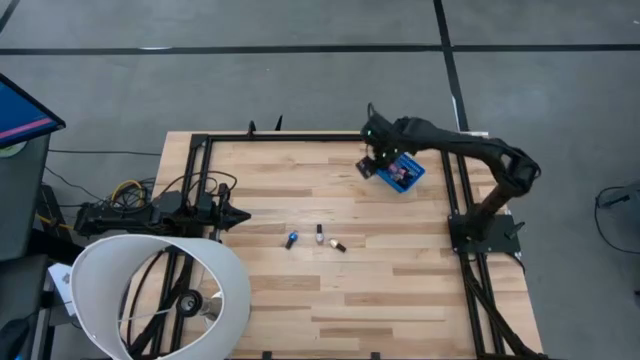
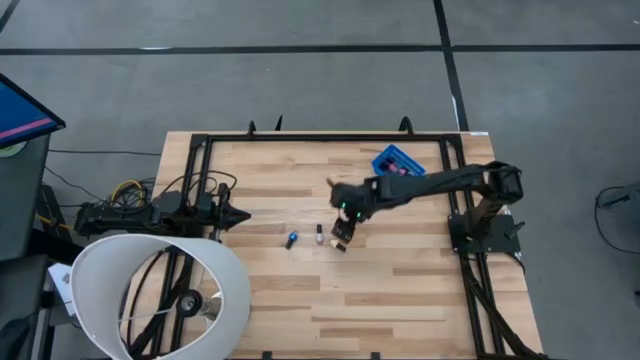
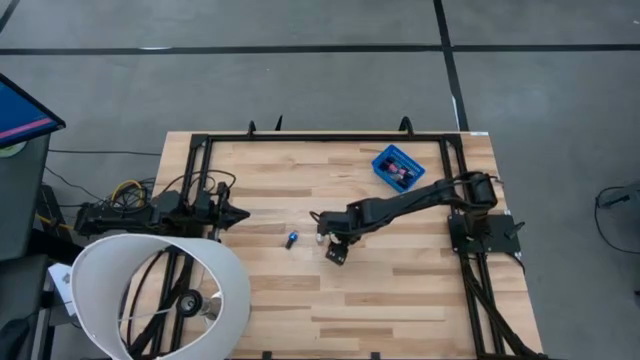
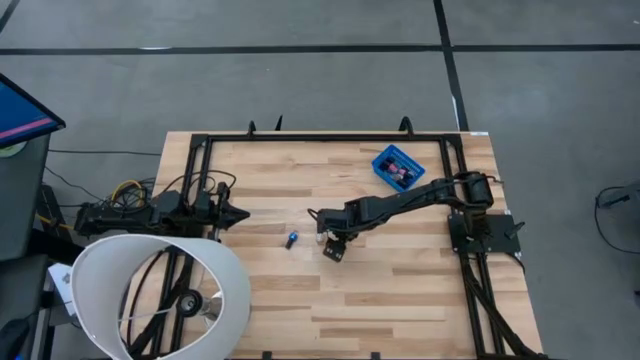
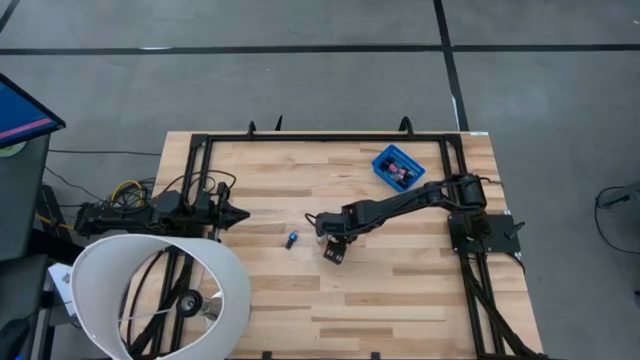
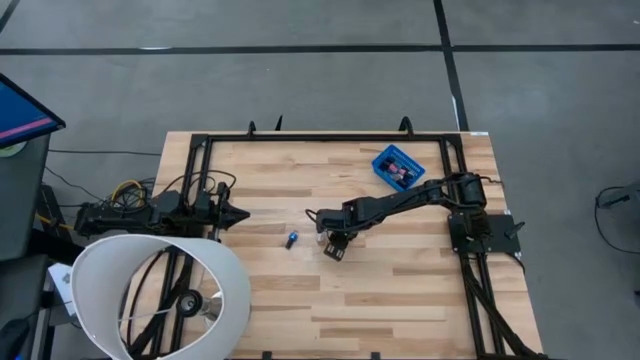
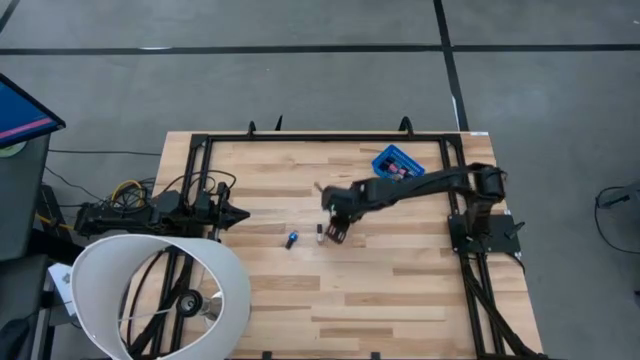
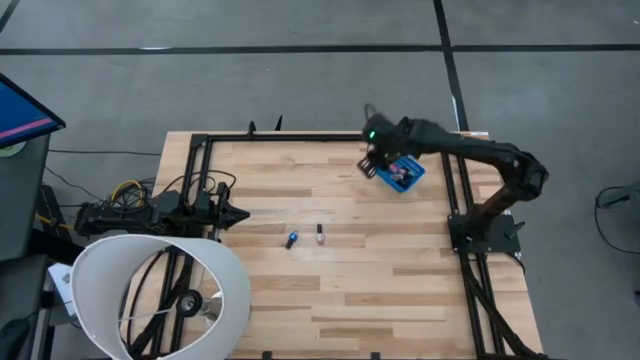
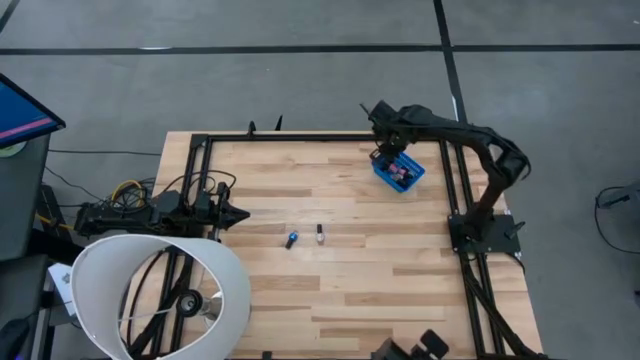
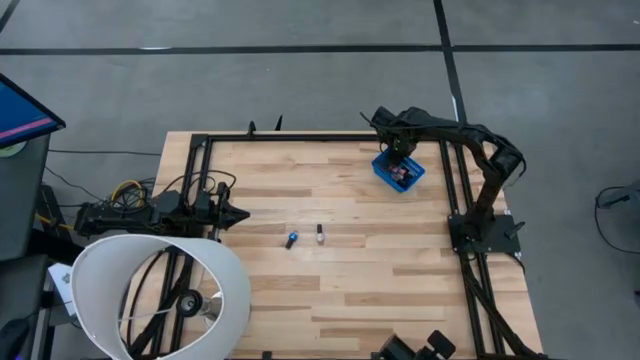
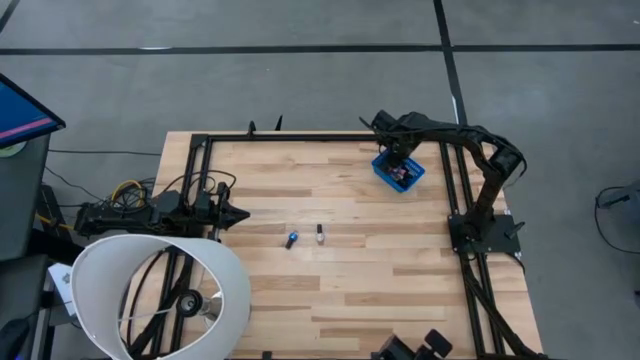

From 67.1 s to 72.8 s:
Task: Pick & Place Nail Polish
Put the yellow nail polish bottle into the blue bin

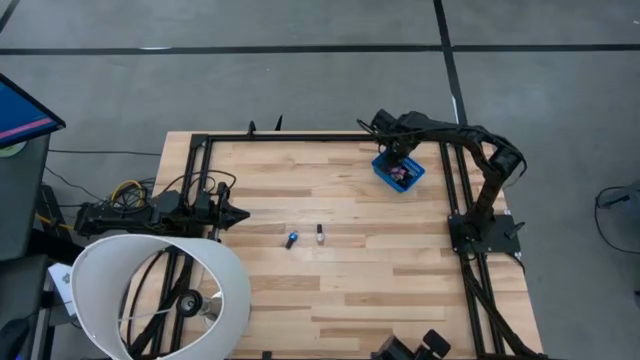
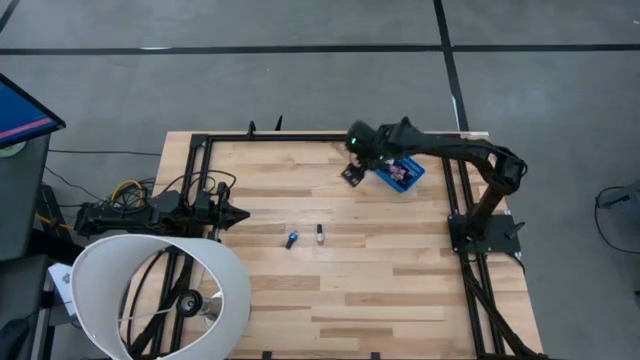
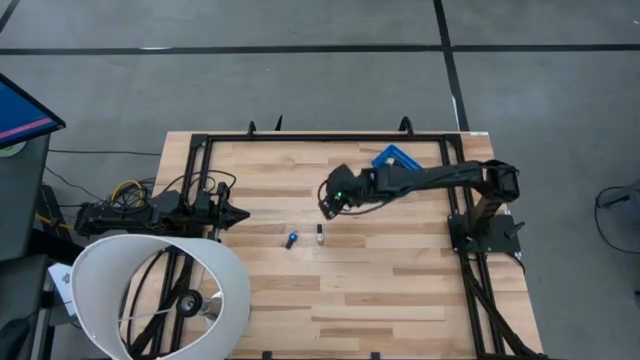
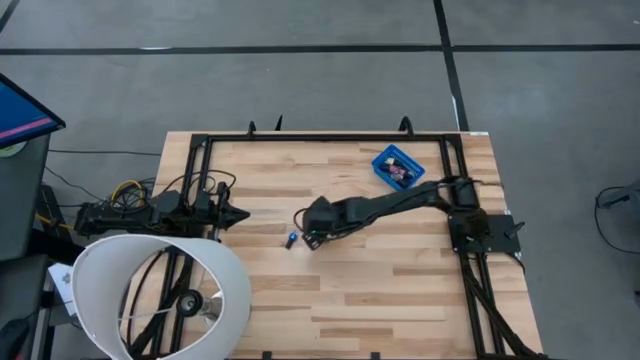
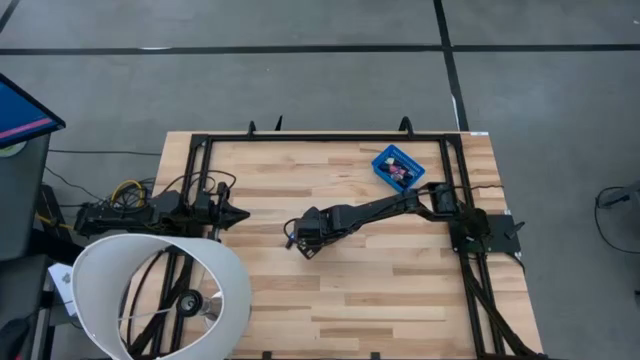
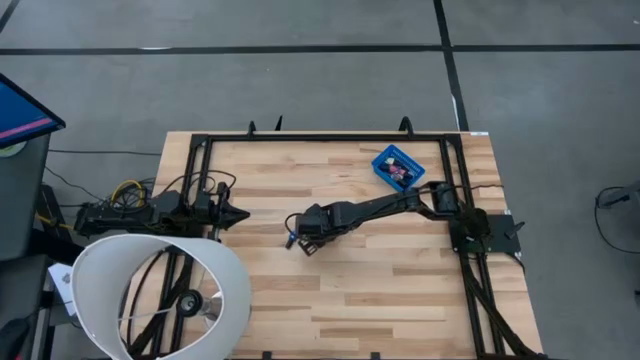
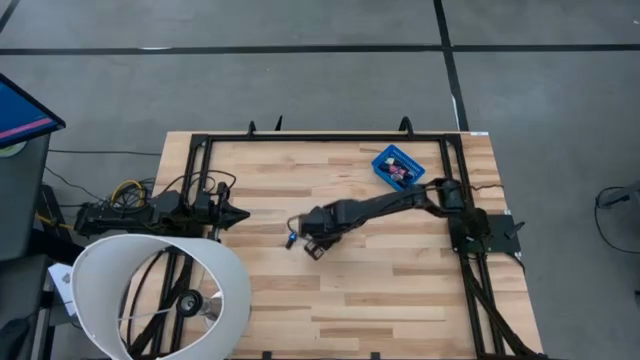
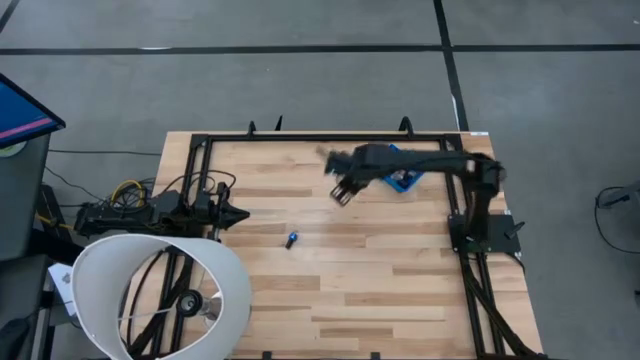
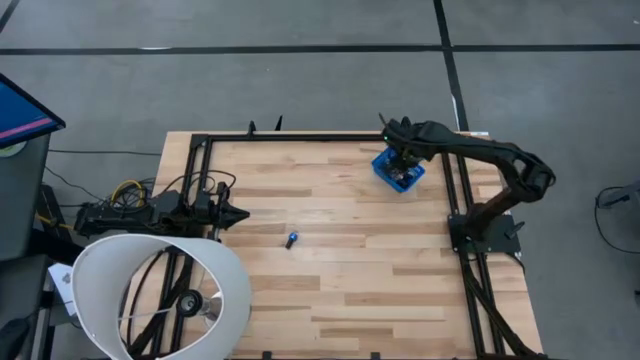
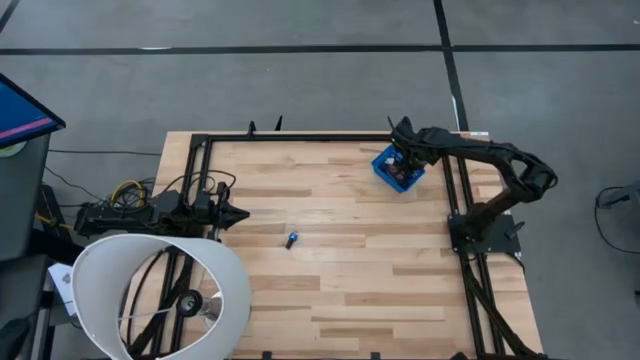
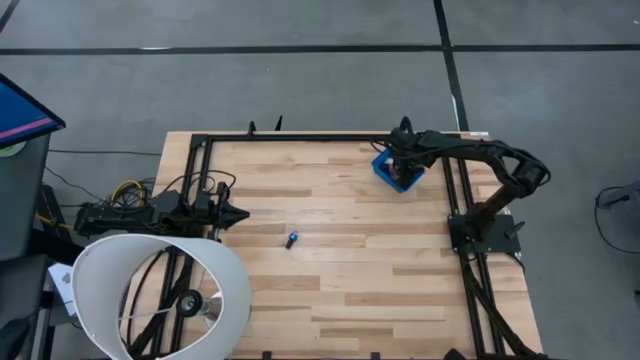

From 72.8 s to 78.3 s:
Put the light gray nail polish bottle into the blue bin

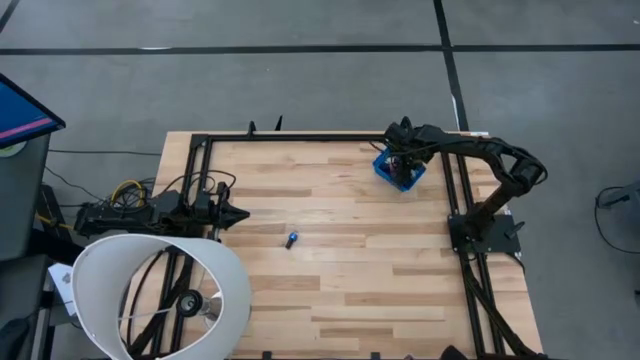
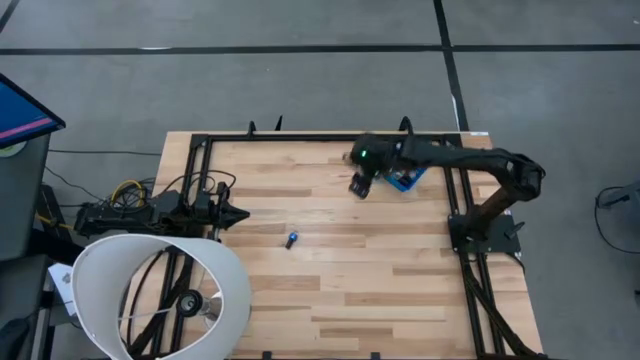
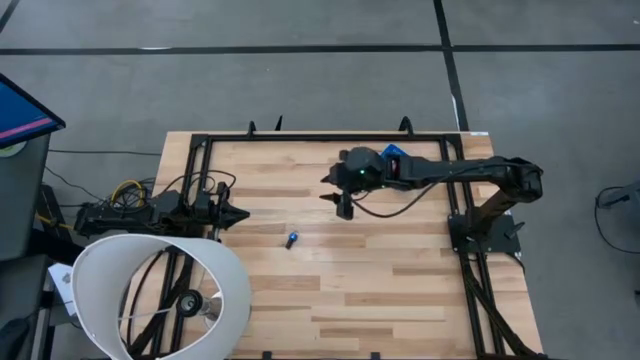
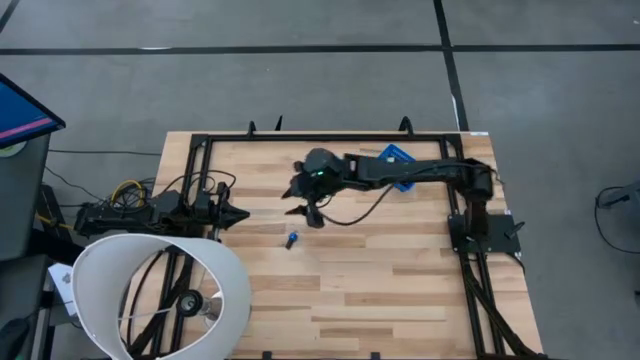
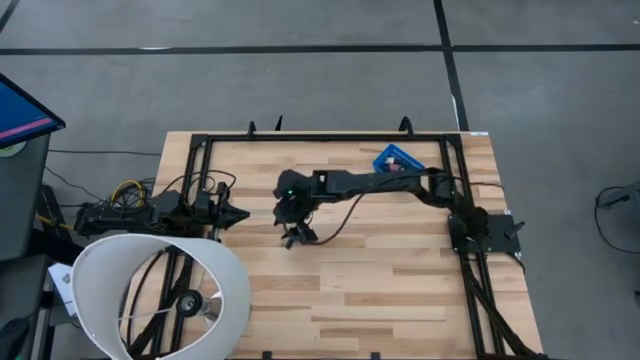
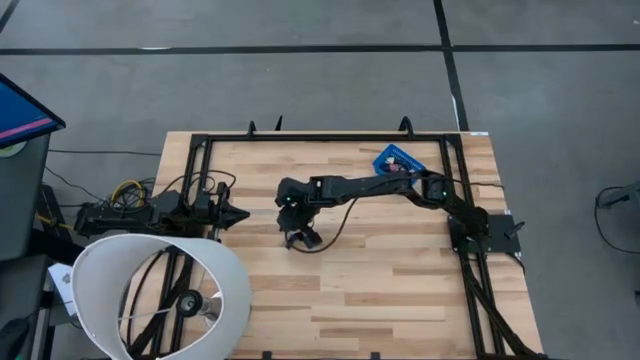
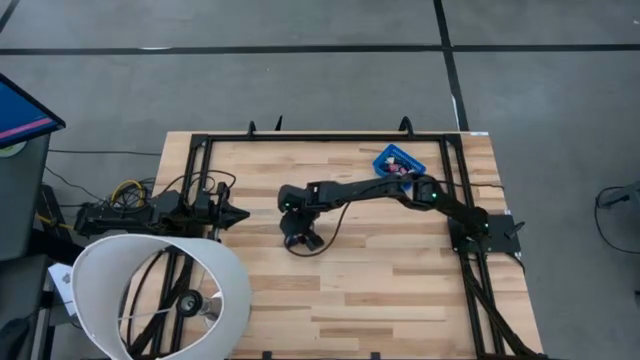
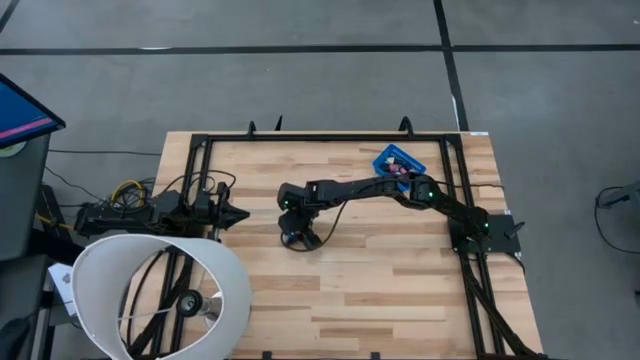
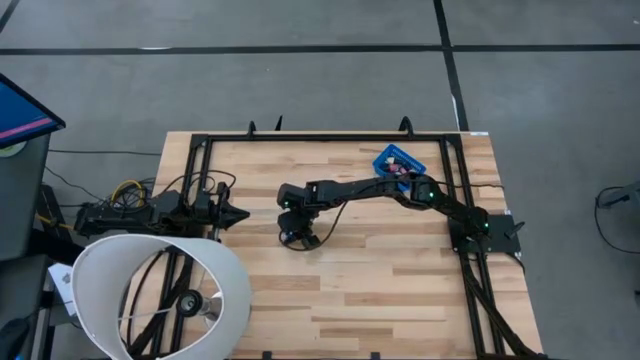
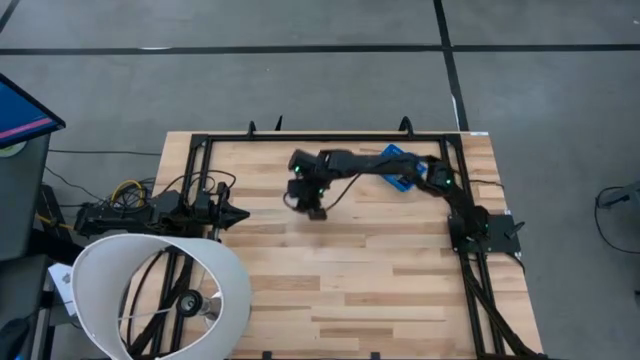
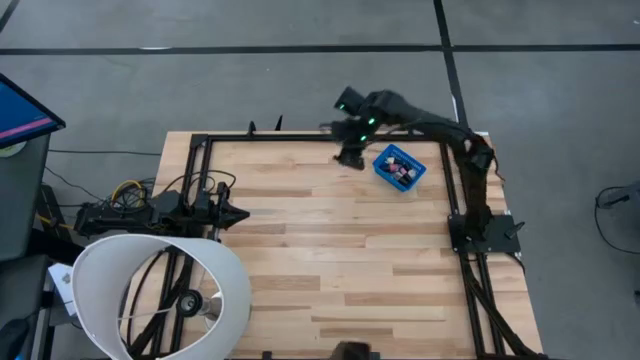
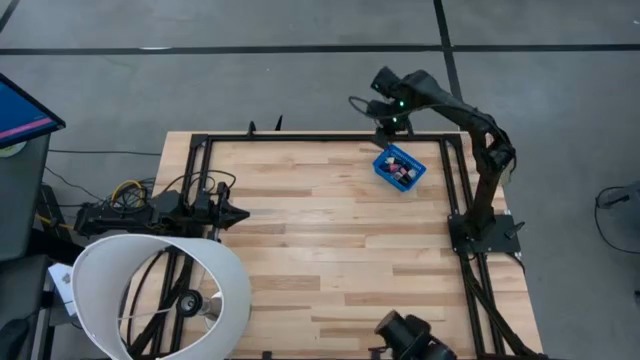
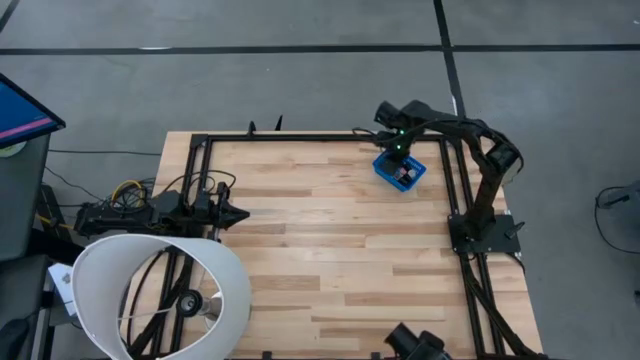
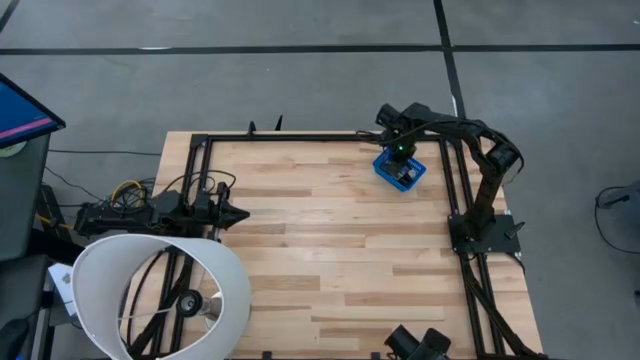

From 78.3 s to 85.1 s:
Put the blue nail polish bottle into the blue bin

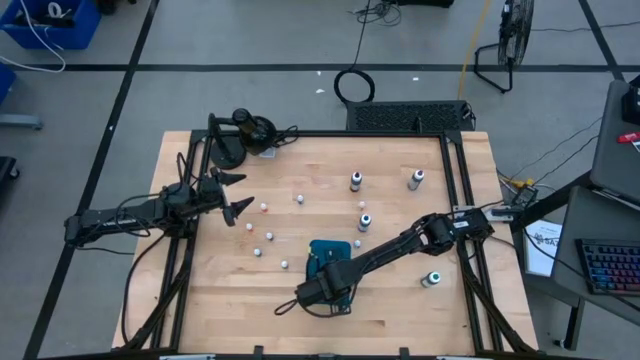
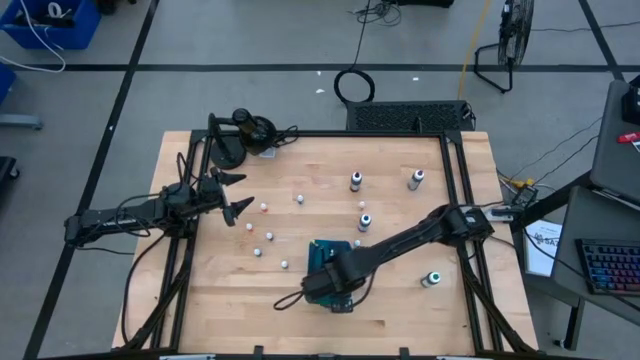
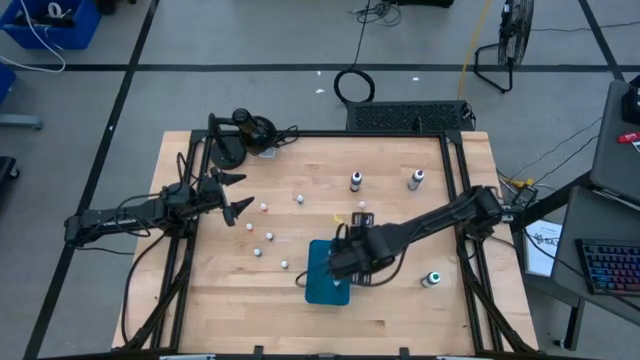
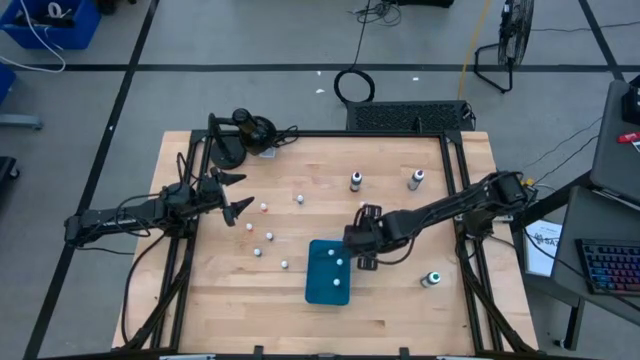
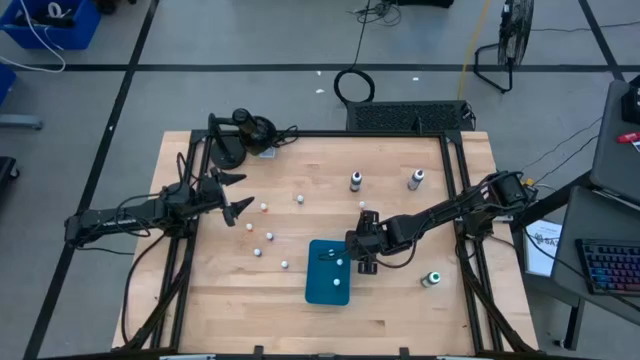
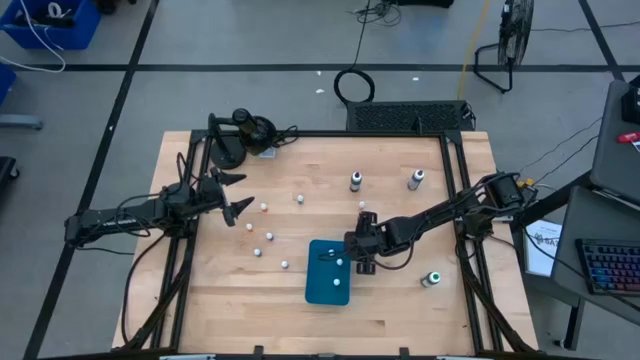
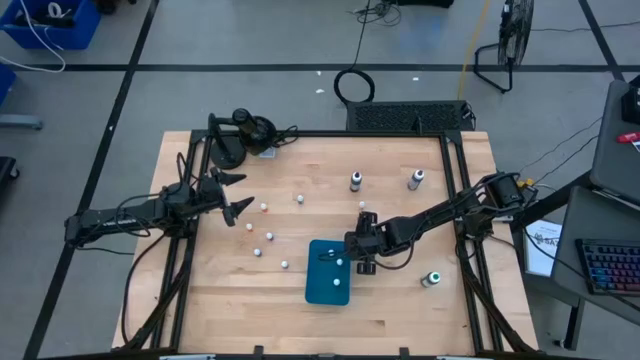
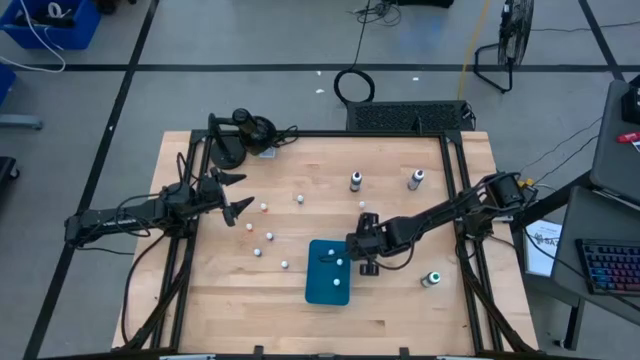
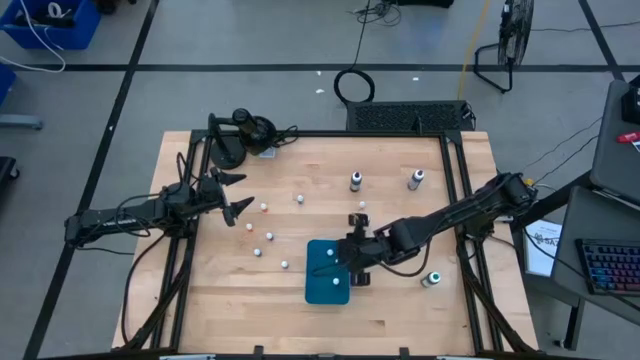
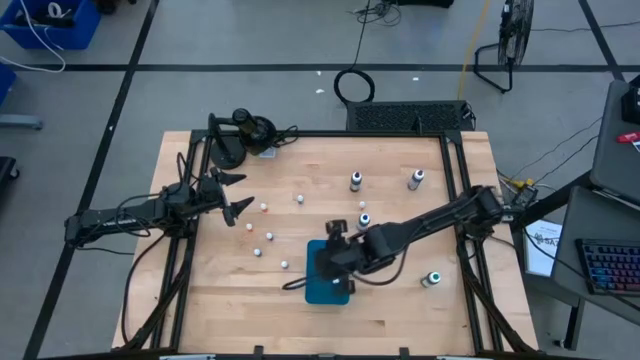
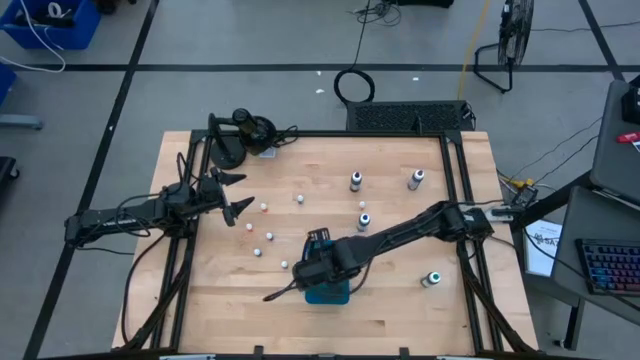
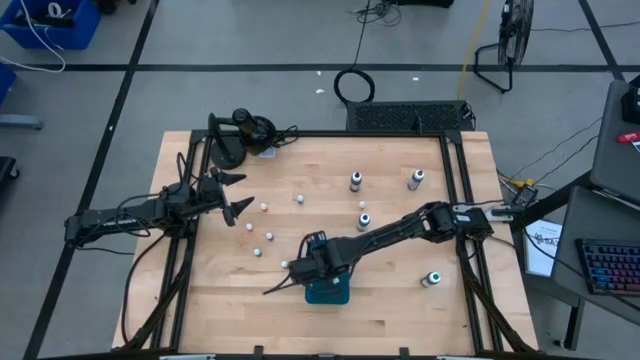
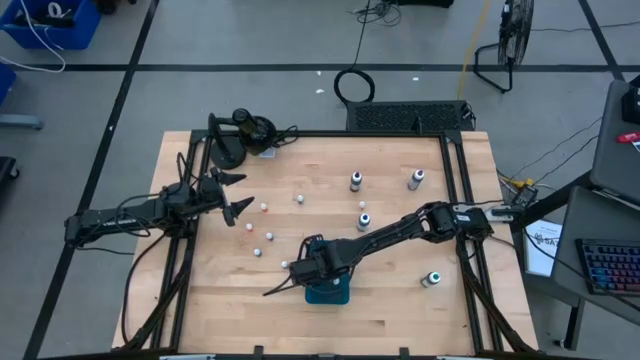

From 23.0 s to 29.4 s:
Task: Pick & Place food coloring
Put the green small food coloring bottle into the blue bin
